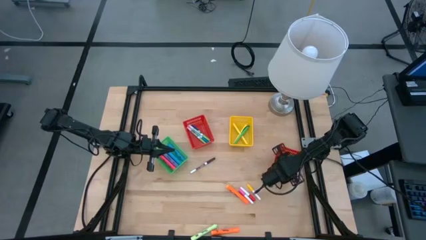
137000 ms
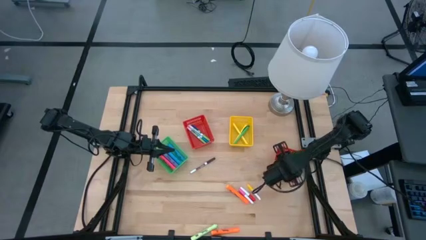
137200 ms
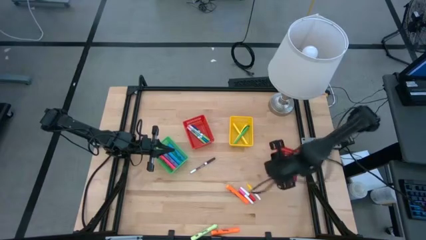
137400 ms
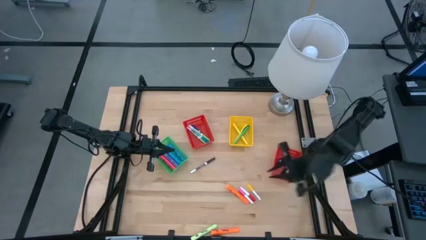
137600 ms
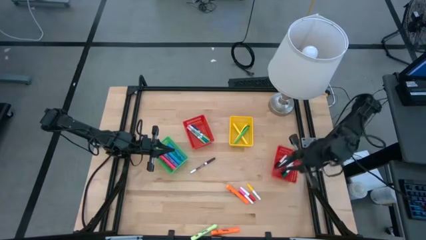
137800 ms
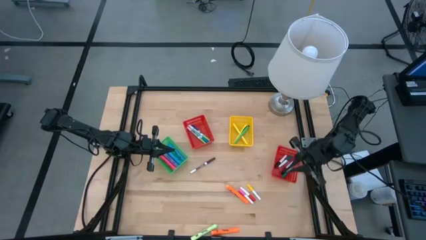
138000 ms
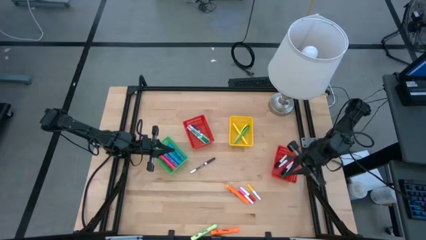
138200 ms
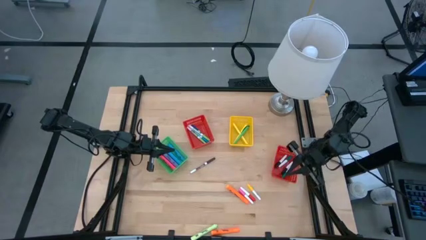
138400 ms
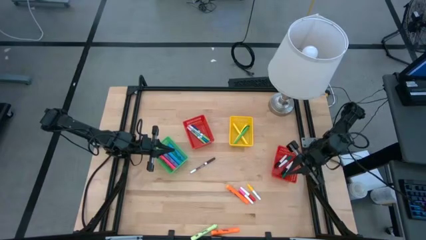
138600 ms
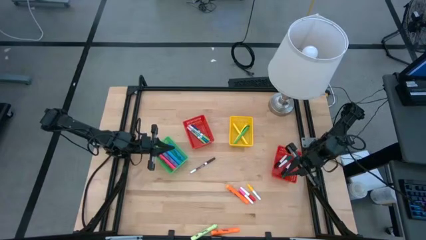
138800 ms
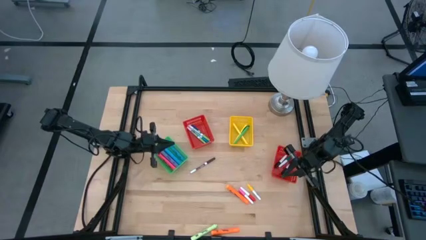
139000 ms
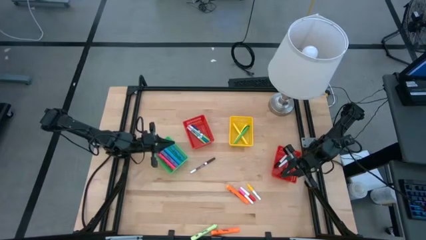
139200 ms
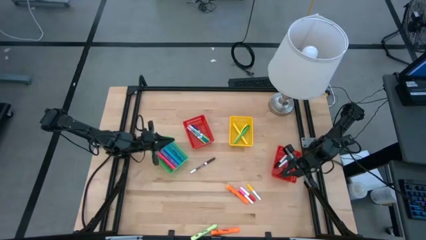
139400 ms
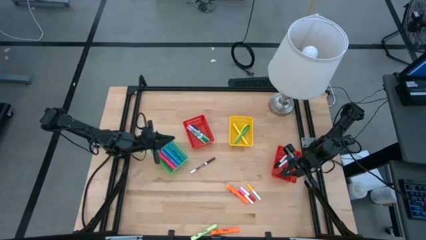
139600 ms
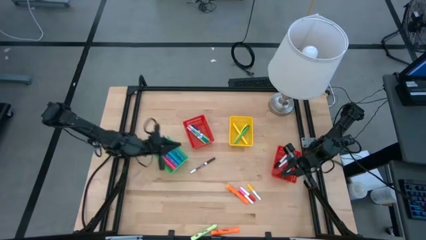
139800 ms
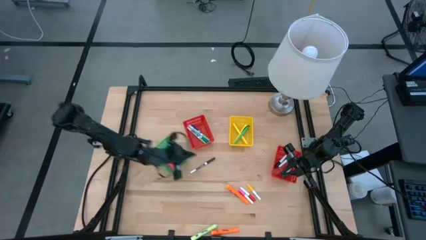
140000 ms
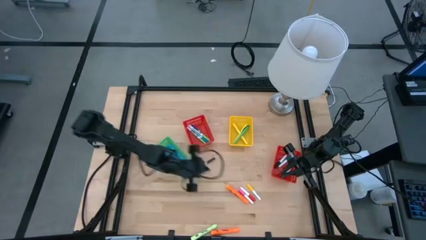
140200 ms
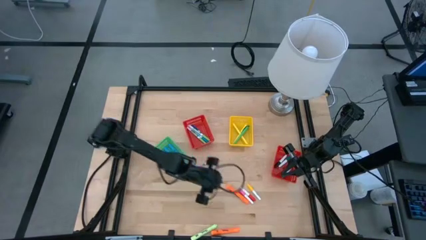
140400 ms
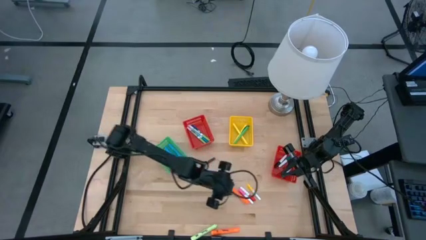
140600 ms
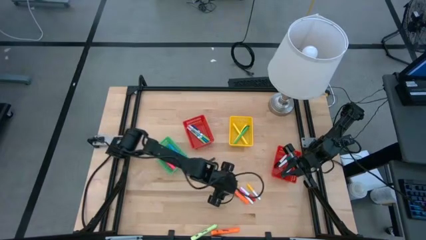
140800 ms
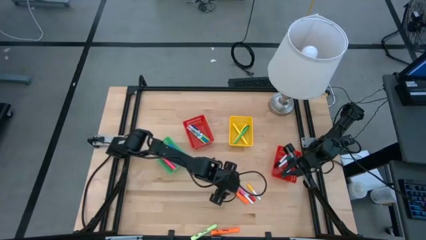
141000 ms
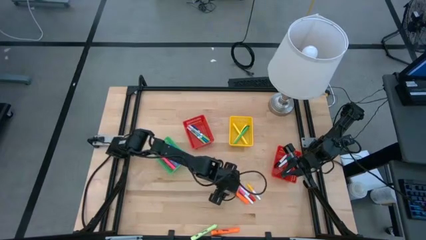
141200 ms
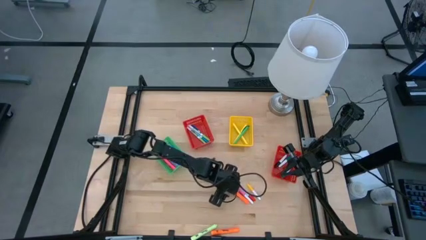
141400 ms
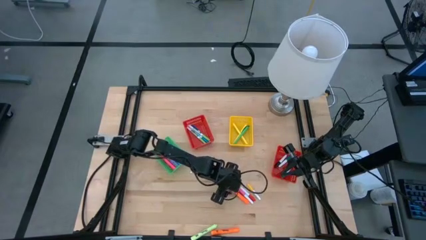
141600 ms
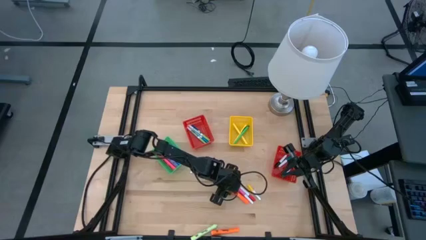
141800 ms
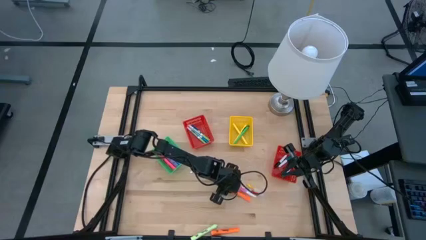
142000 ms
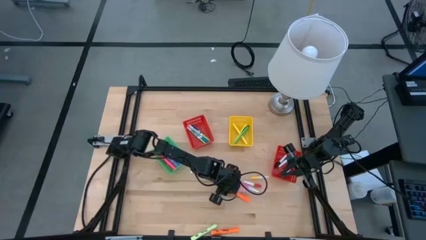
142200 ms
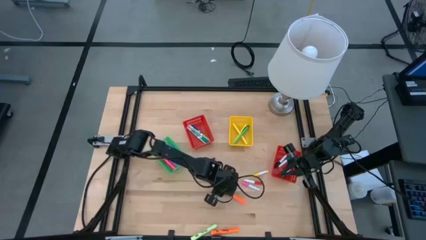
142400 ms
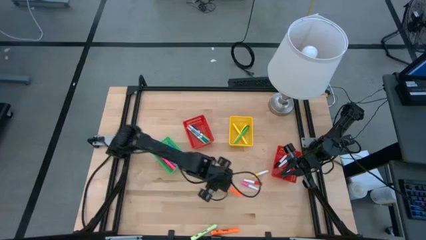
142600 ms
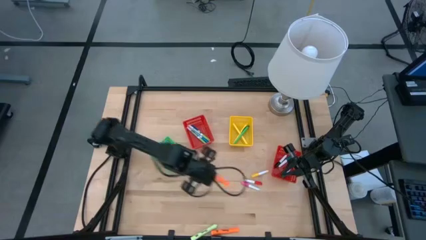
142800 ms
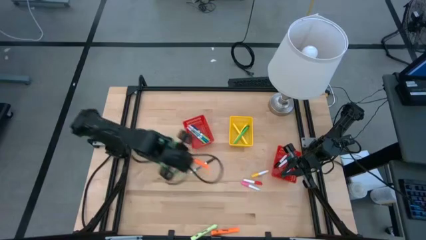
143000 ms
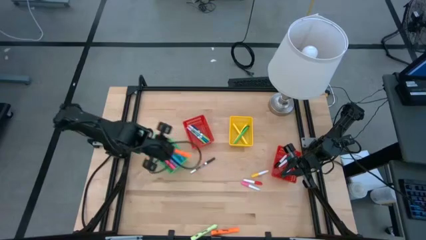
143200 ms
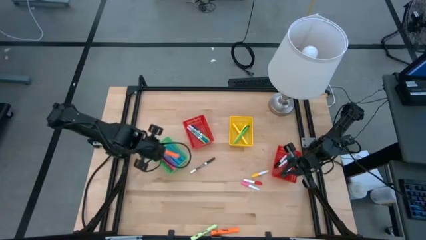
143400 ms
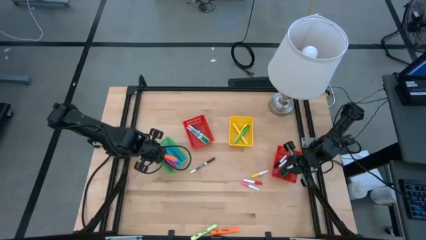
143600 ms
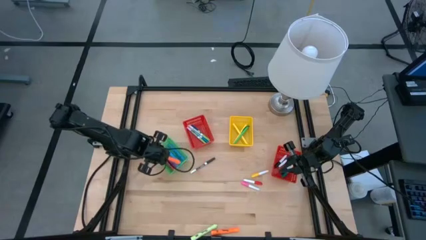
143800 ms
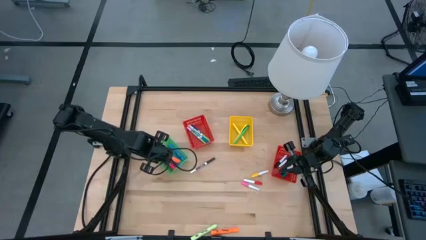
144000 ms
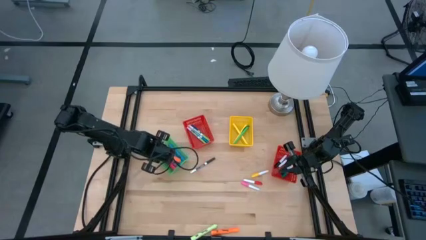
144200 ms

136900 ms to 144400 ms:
Task: Pick & Place Markers
Put the top large orange highlighter pen into the green bin

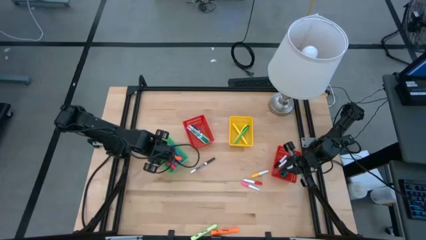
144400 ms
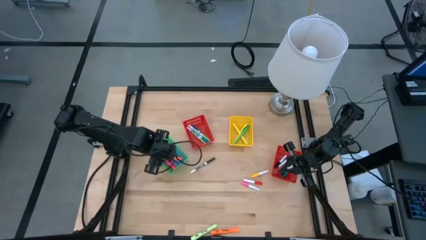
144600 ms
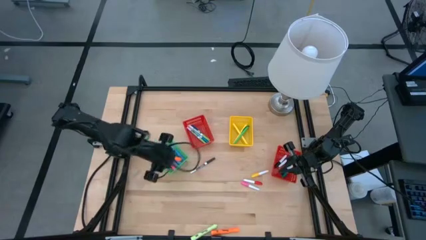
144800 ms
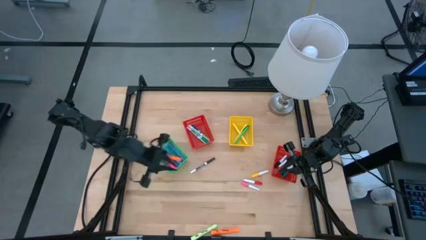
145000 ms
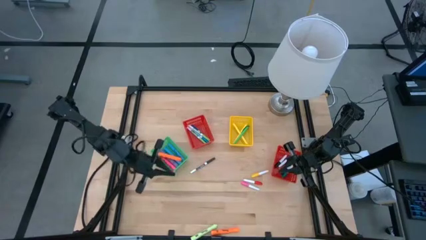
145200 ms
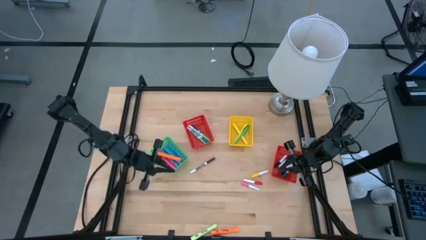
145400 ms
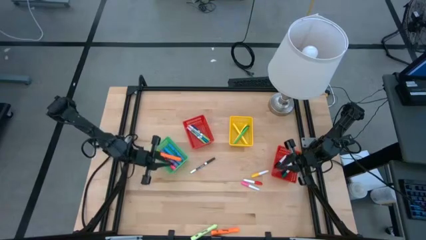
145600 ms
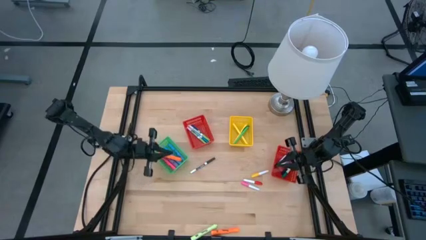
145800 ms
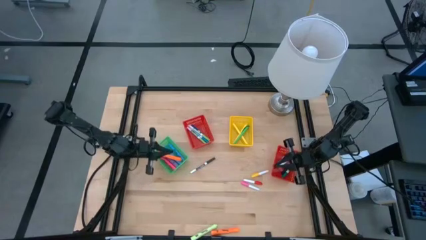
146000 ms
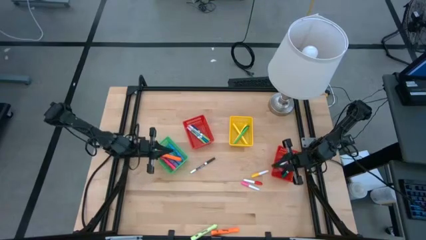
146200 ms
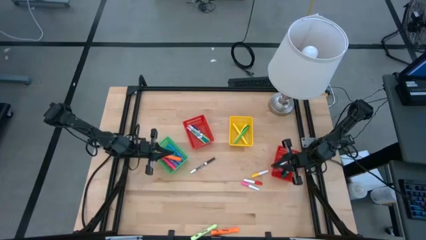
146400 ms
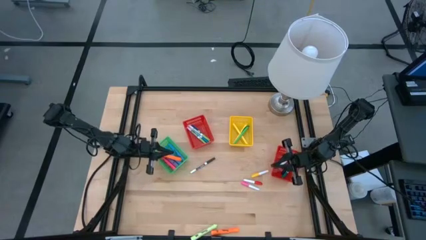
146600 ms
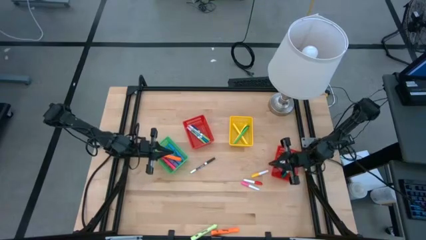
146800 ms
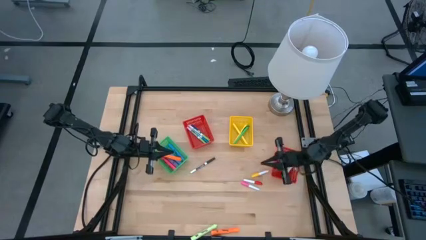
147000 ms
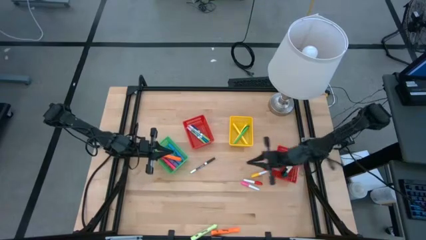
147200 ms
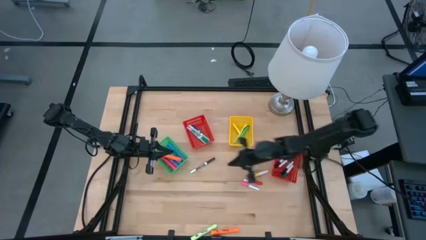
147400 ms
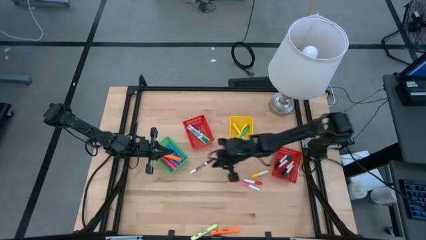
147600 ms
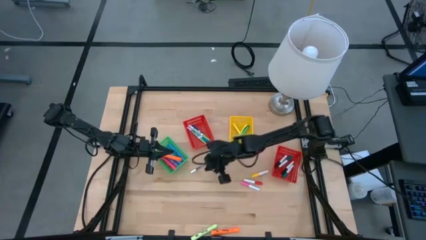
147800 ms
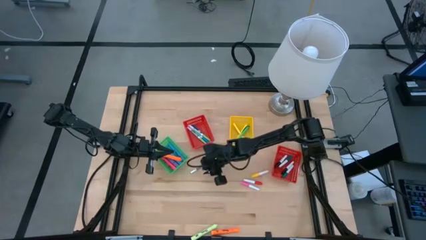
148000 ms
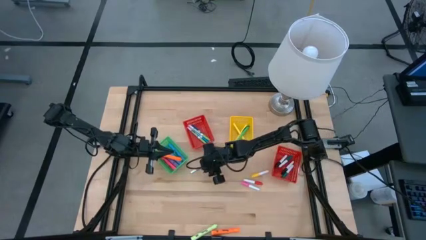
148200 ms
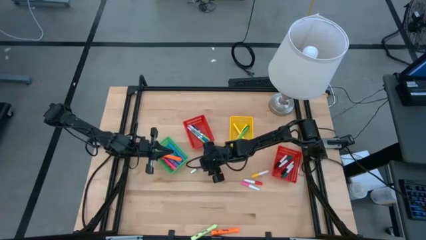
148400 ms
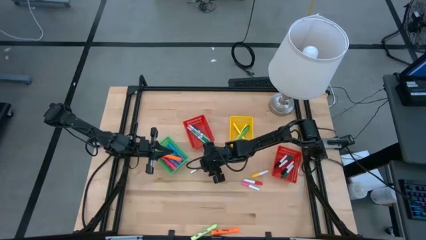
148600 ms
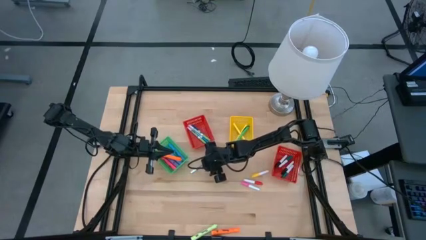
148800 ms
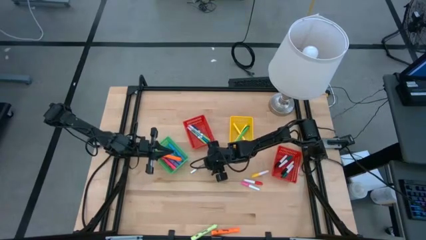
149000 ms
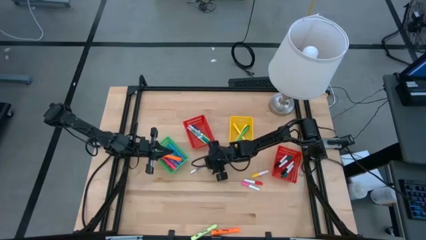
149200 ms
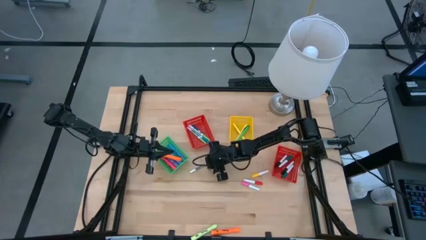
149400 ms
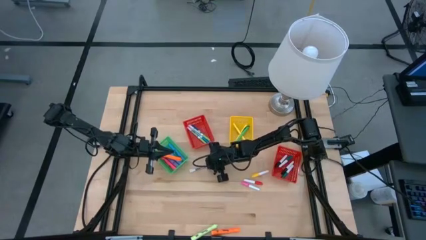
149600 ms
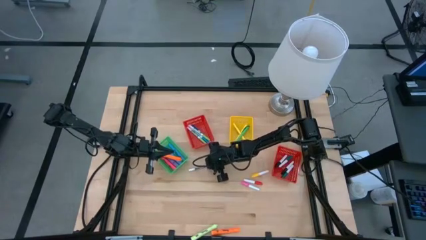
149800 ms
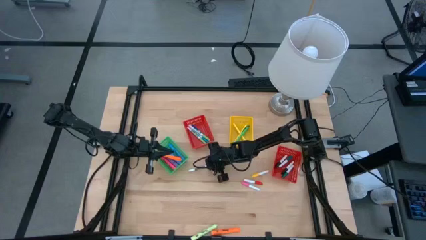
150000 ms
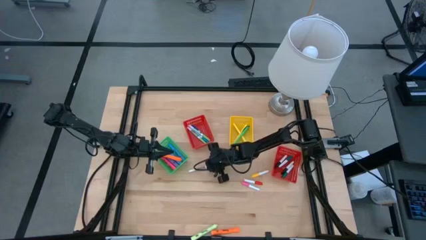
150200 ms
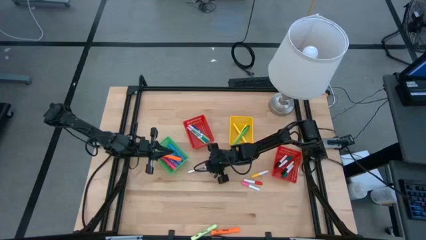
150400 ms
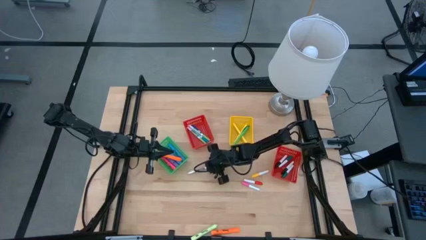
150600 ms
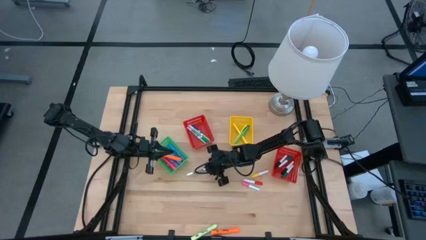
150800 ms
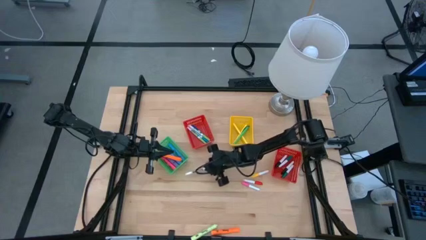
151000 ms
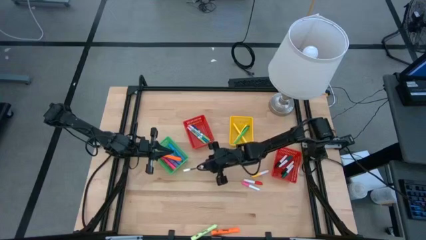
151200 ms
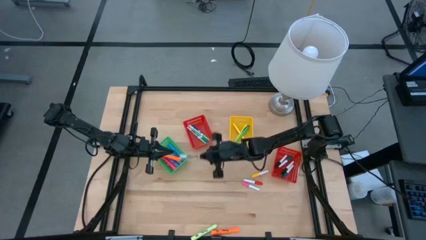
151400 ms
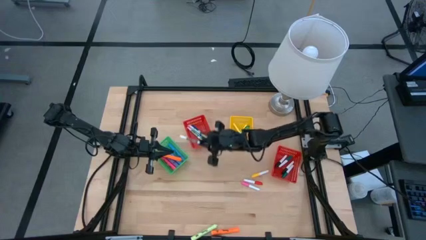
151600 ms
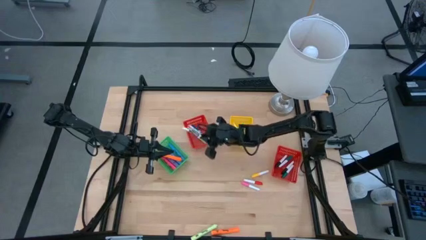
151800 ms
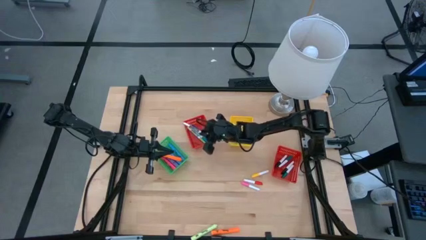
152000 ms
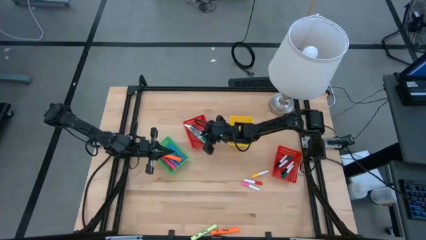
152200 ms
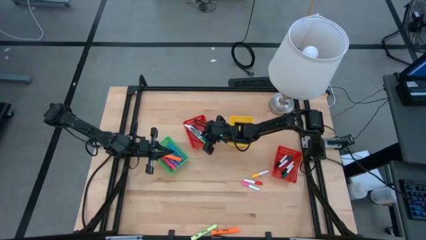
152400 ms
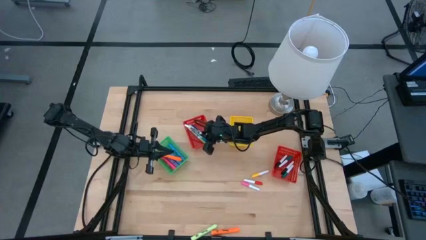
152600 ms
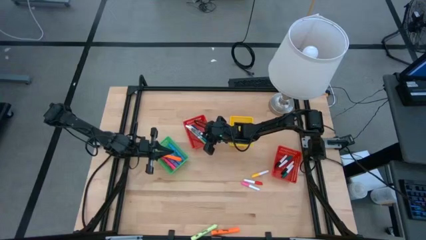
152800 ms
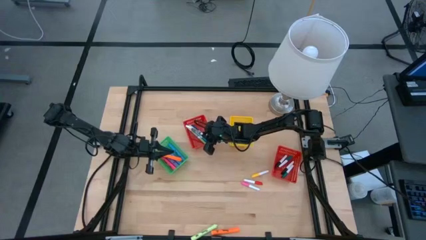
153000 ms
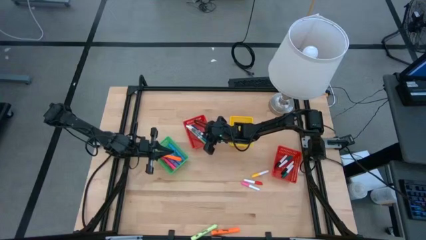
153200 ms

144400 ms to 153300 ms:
Put the brown marker pen into the left red bin
